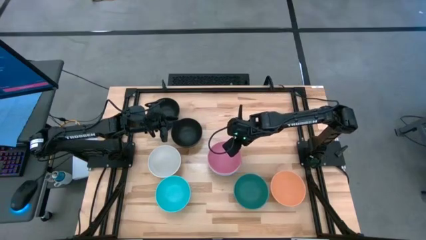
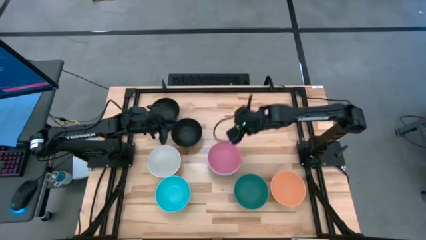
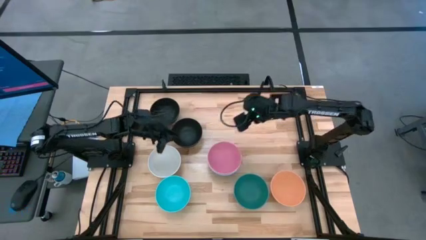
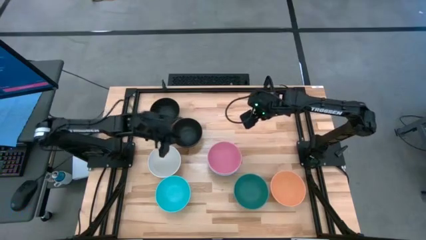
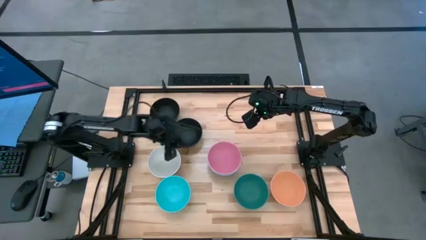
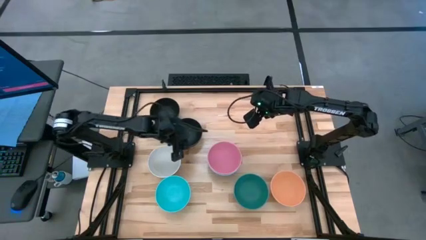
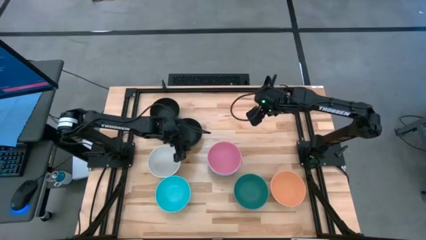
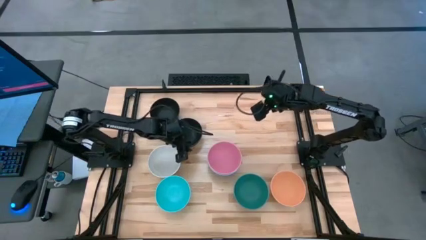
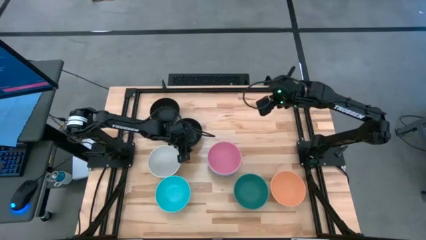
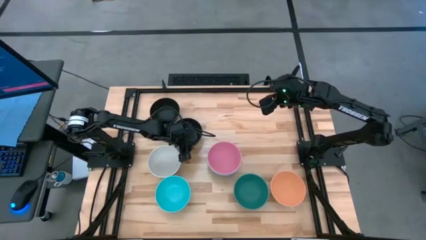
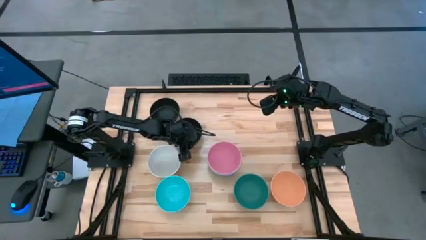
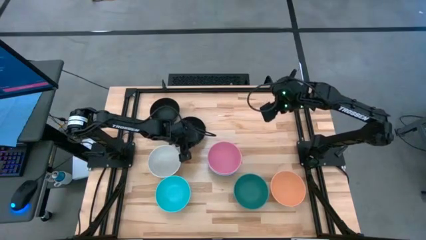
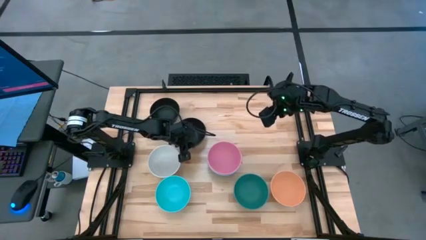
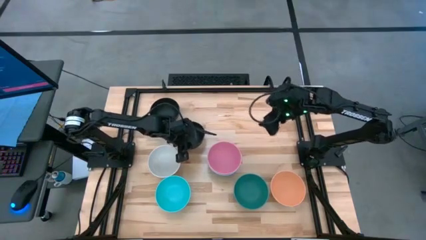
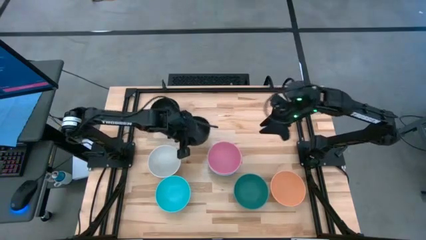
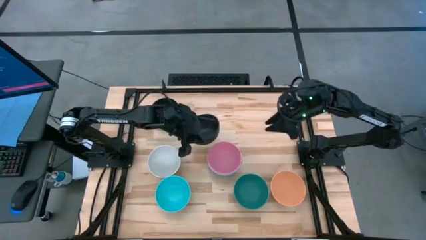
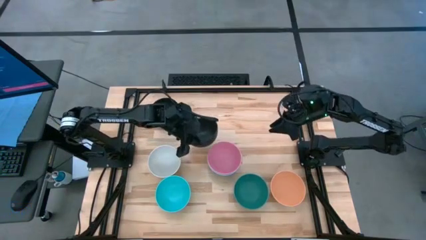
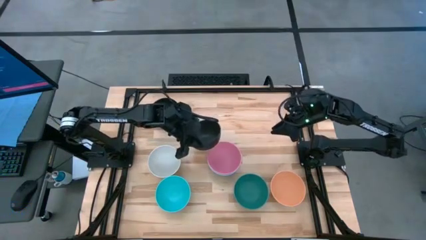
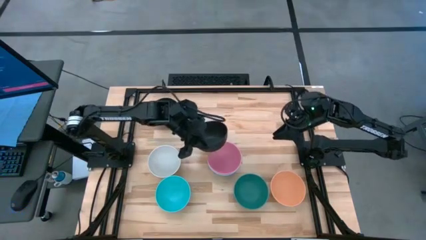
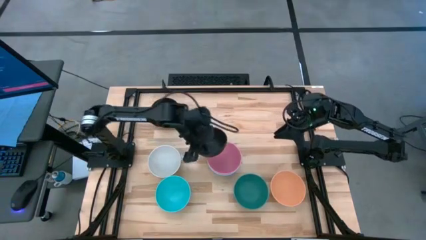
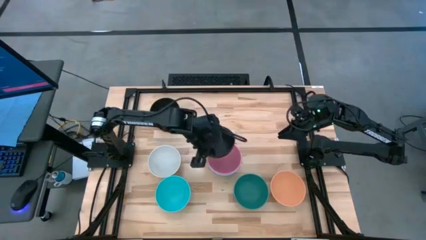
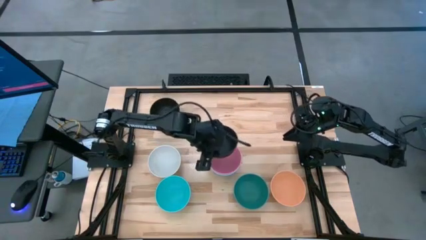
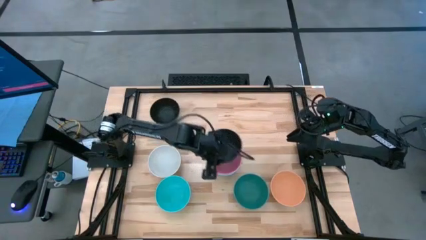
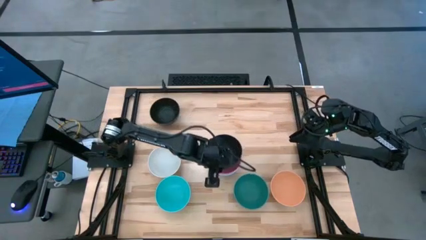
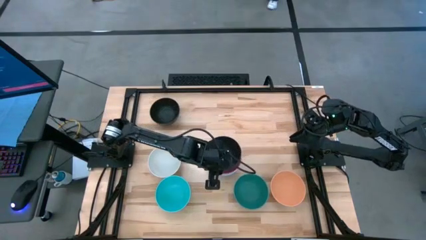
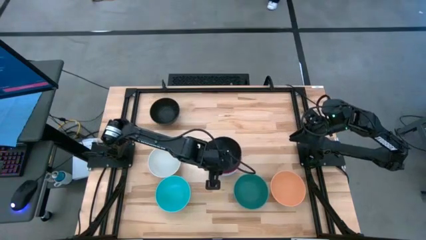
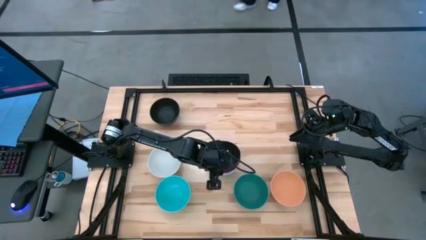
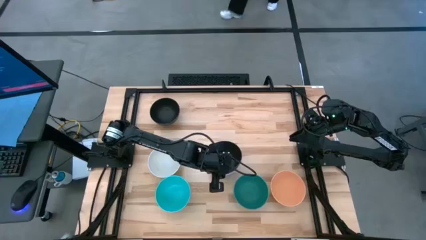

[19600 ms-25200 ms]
Task: Nest bowls inside each other
Stack the bottom black bowl on top of the pink bowls

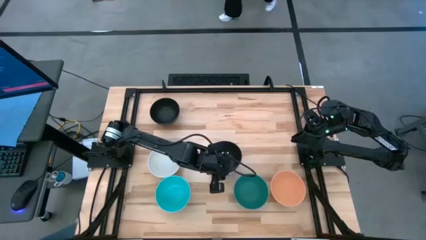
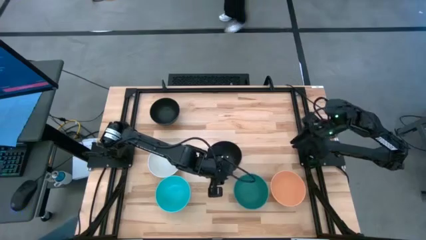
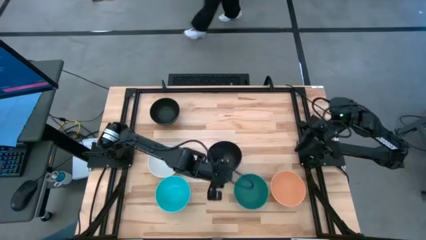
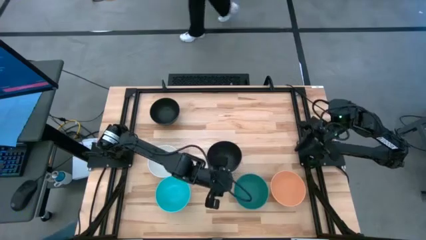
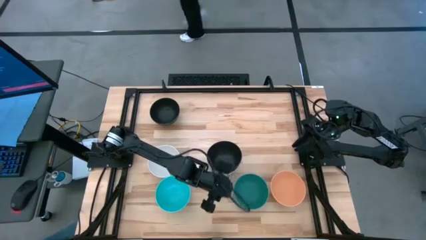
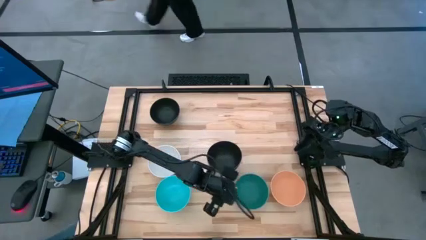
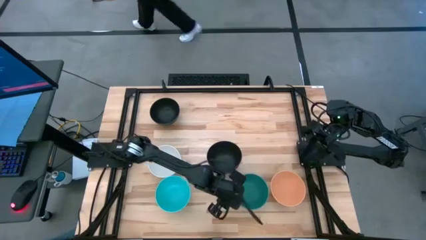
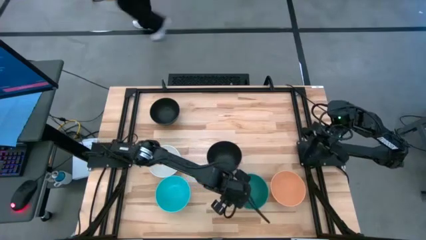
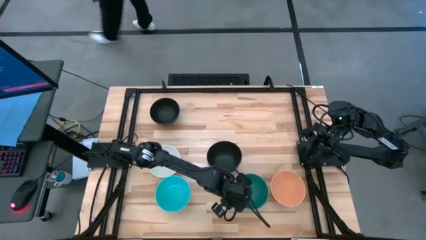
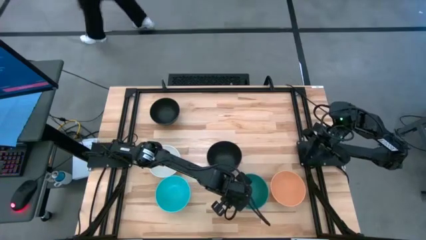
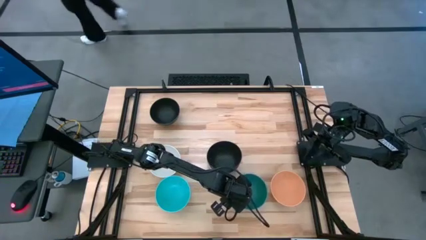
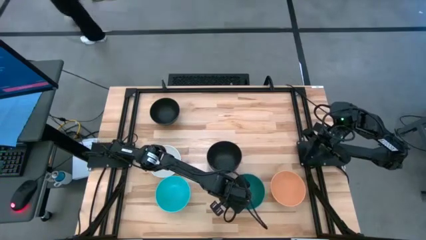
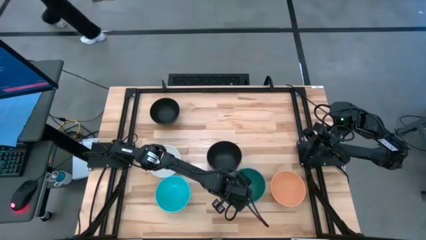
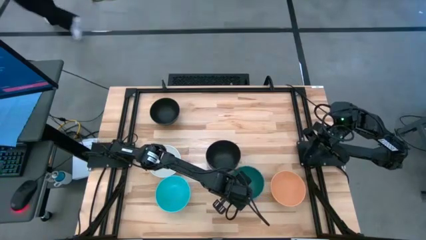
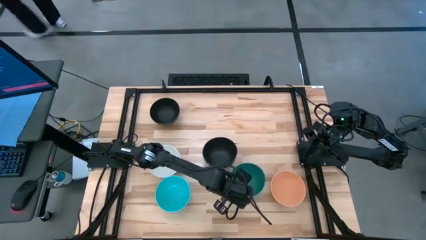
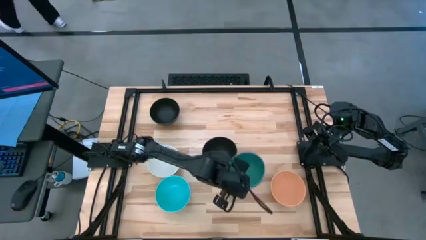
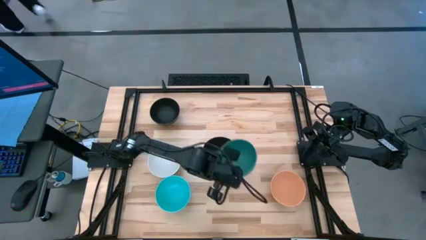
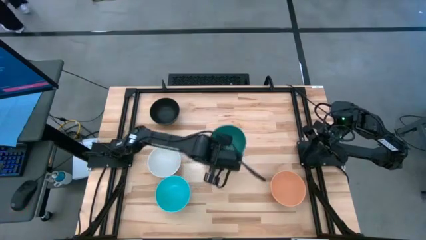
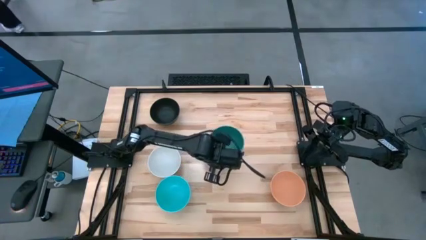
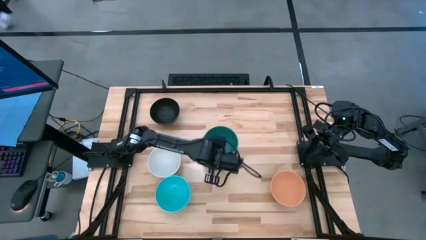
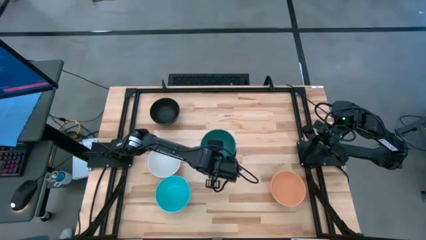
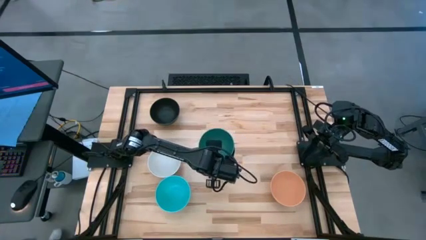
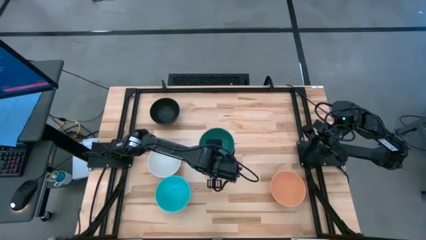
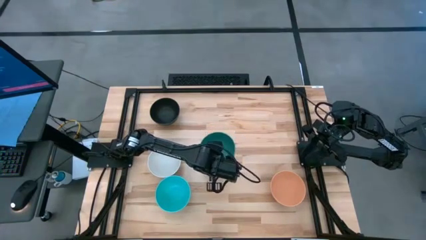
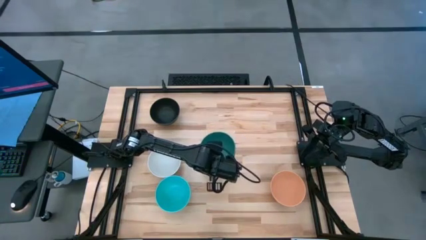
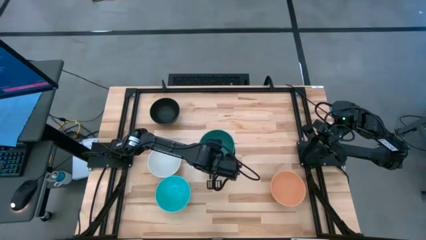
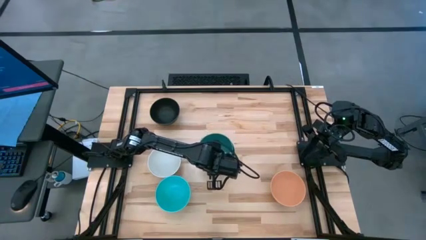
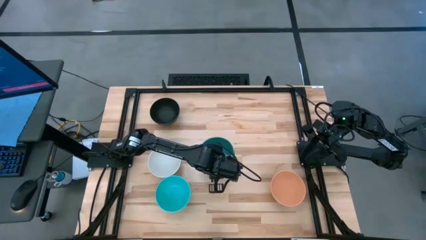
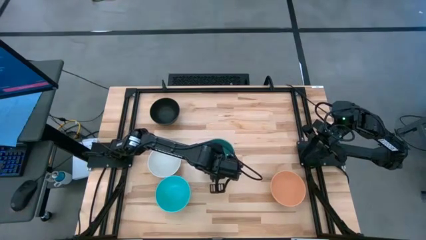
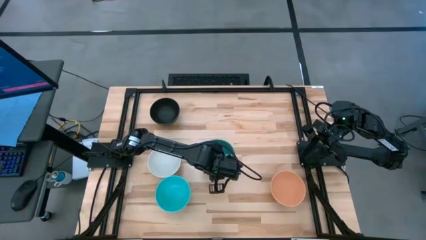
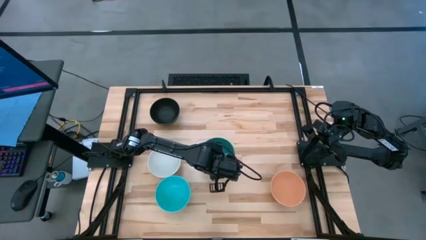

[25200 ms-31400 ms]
Stack the green bowl on top of the black bowls

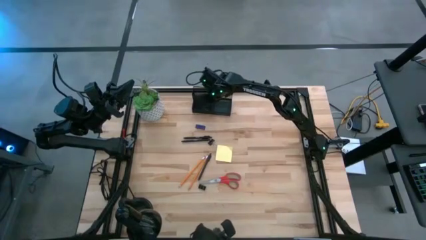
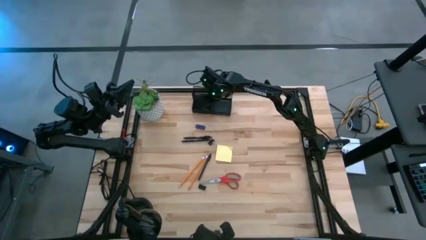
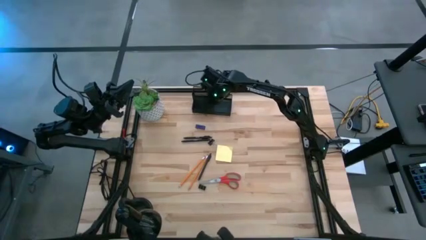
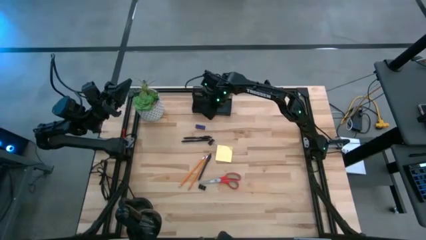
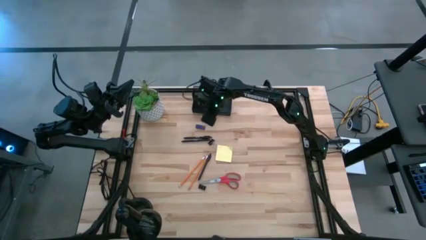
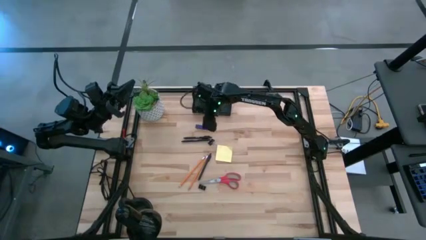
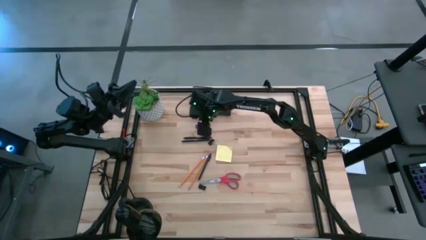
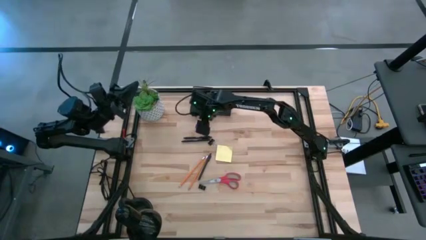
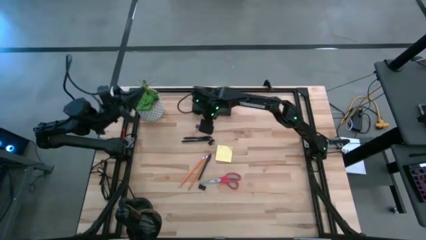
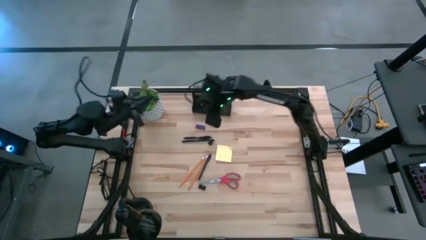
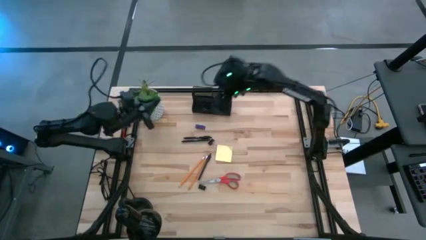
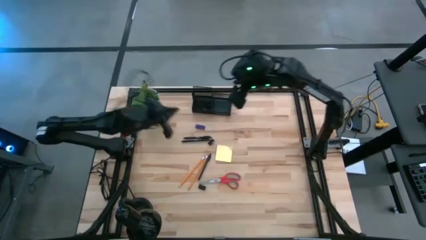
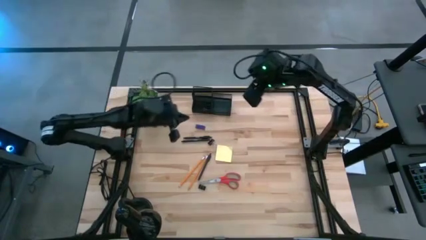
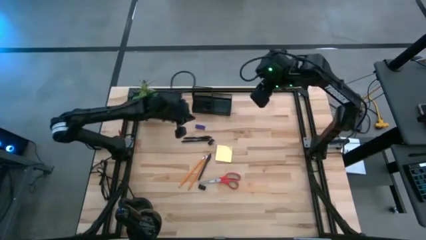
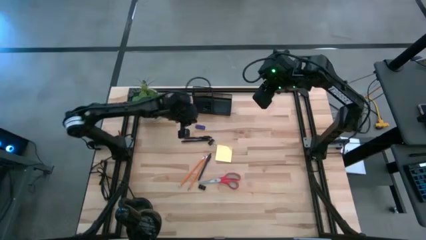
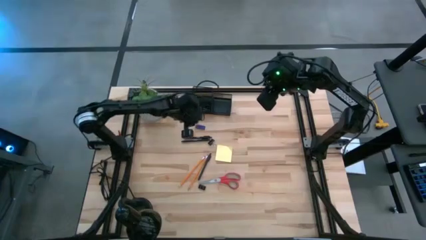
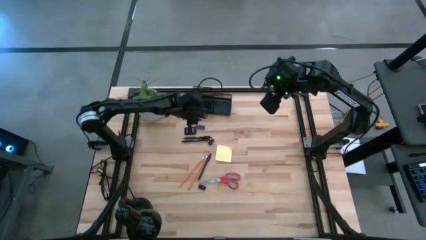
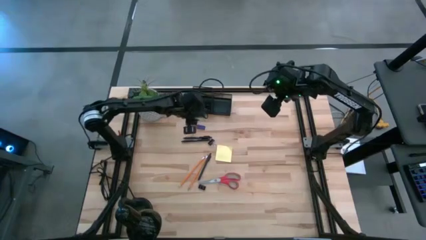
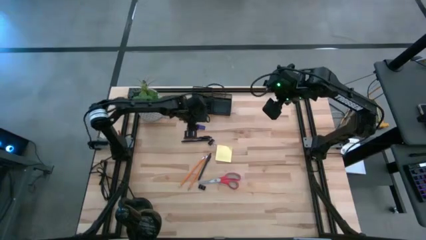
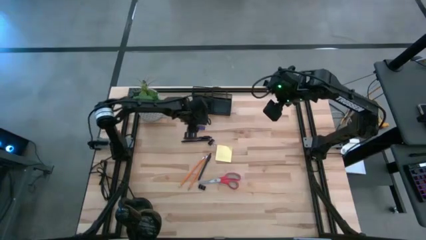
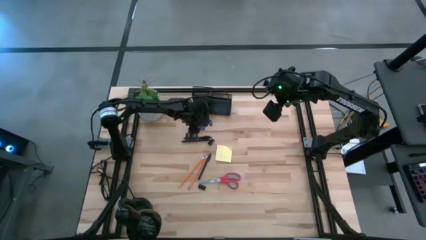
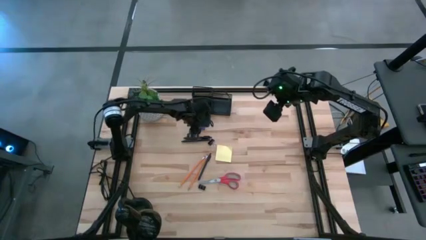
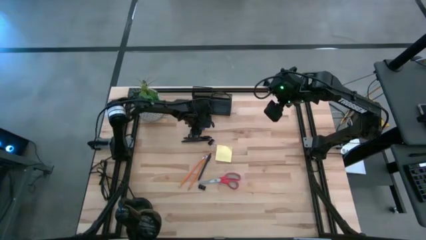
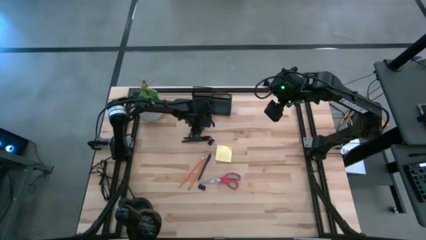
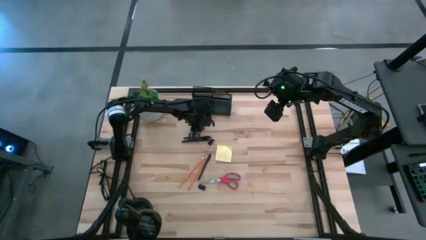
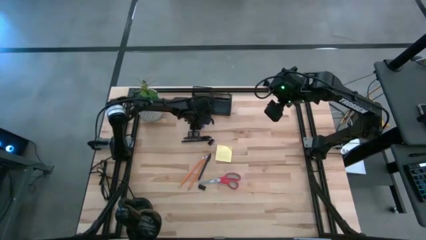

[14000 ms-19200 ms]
Task: Pick and place office supplies into organizer
Put the eraser into the bottom left section of black desk organizer
